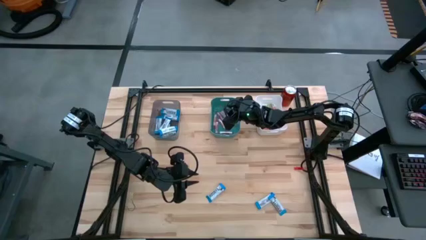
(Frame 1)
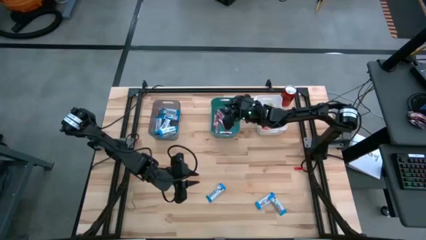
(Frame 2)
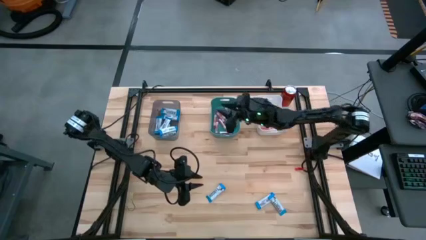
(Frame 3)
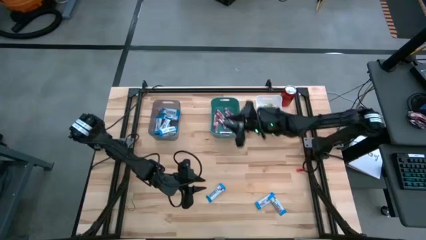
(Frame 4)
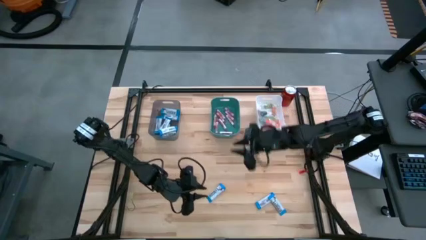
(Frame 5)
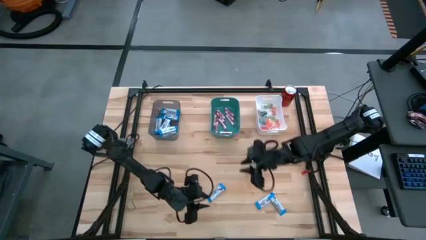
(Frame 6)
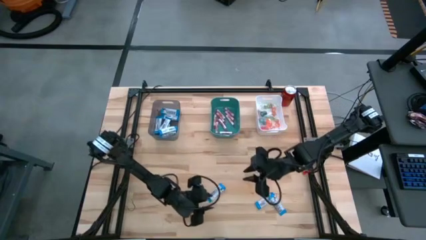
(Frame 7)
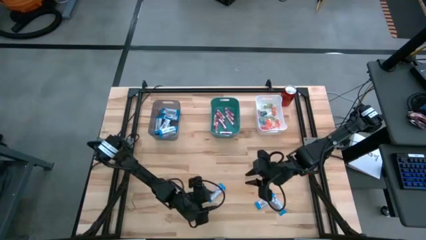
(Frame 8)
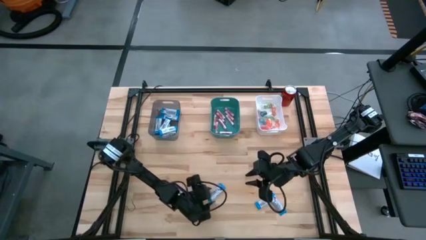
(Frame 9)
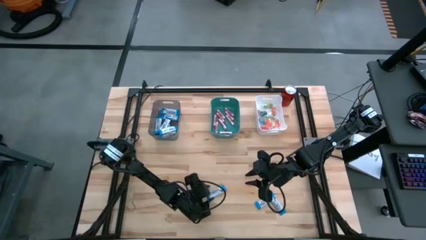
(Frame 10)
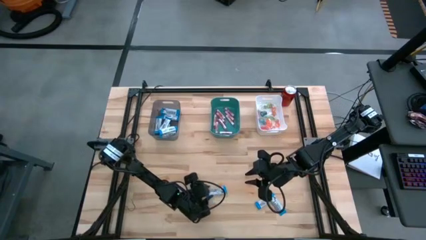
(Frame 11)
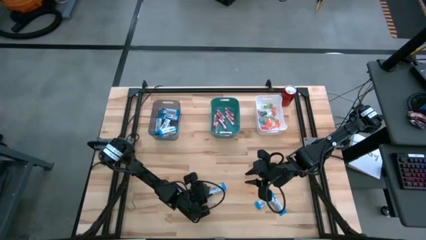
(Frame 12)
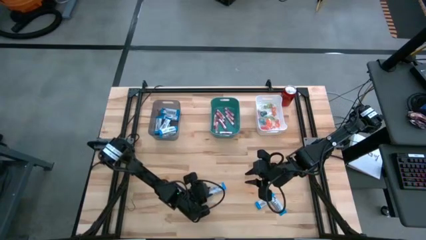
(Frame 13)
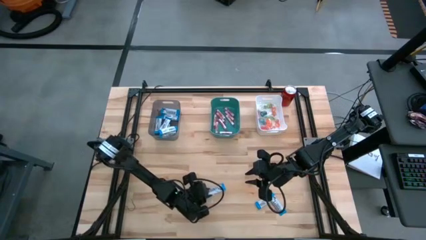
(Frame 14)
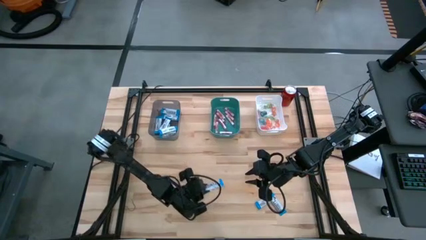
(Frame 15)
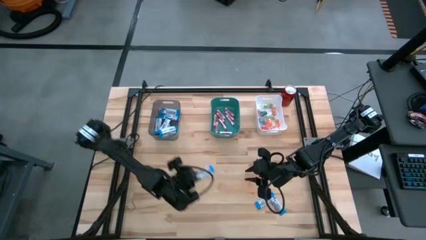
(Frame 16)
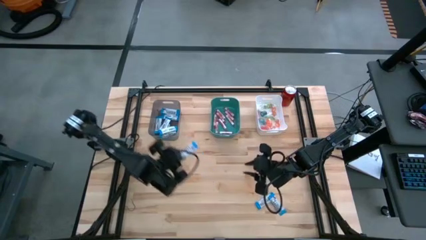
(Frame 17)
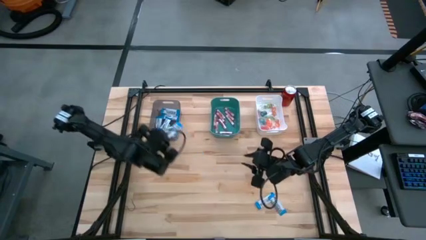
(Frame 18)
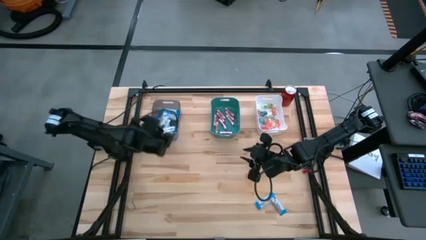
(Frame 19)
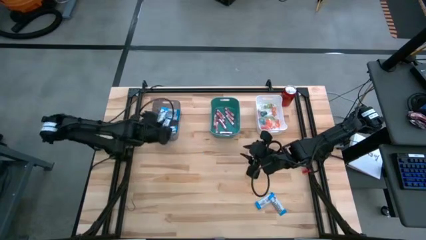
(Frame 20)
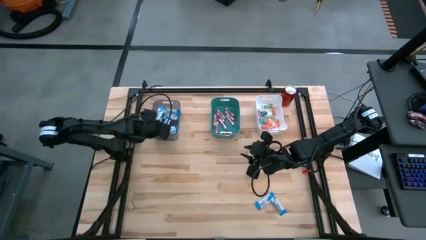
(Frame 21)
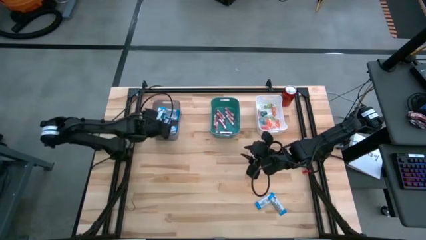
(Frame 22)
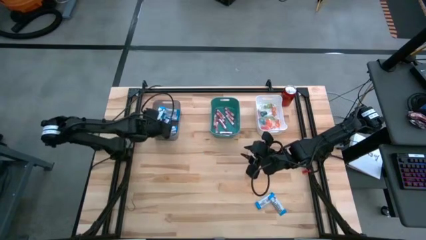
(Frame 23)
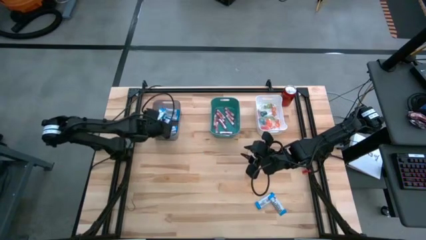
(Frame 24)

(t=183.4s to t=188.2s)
Task: Sort candy
Put the white chocolate into the black bin

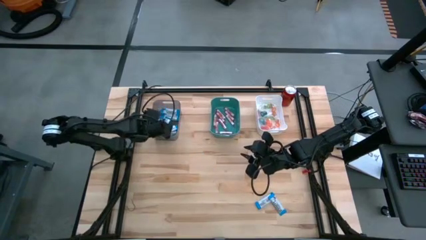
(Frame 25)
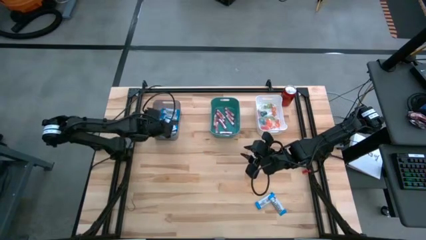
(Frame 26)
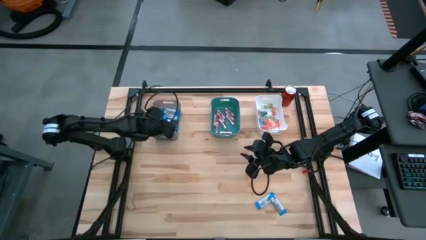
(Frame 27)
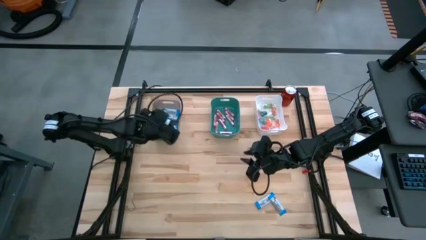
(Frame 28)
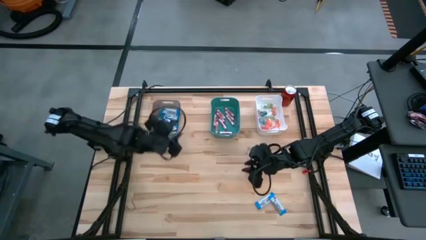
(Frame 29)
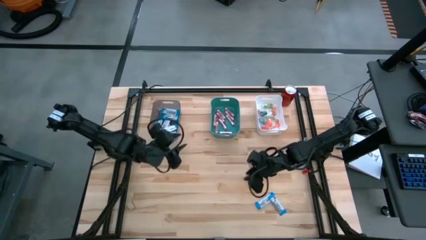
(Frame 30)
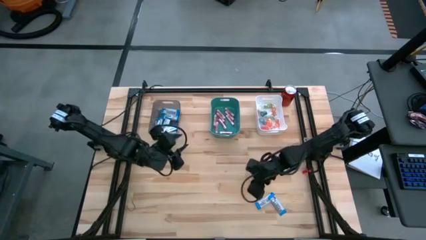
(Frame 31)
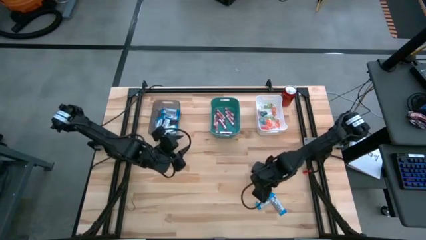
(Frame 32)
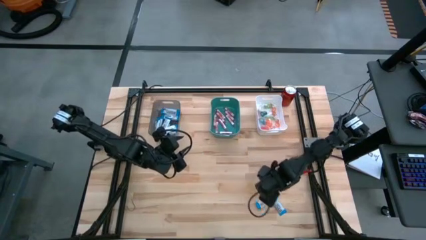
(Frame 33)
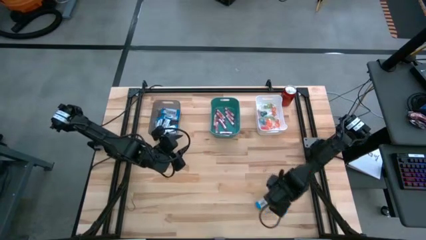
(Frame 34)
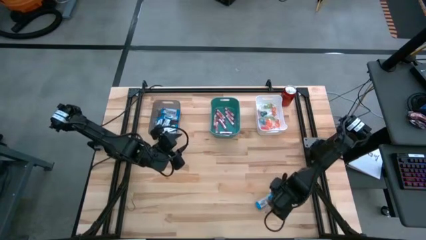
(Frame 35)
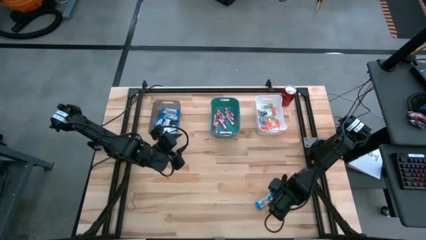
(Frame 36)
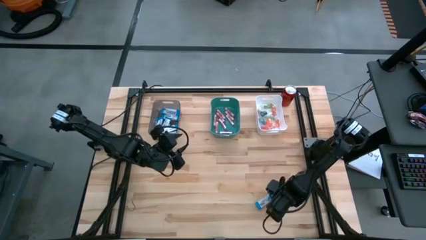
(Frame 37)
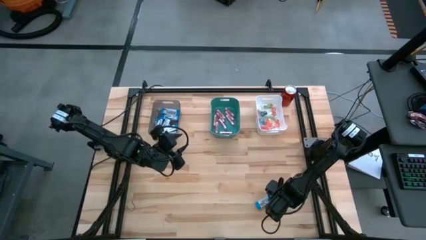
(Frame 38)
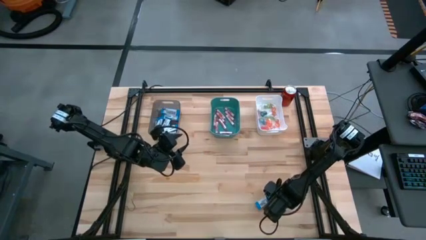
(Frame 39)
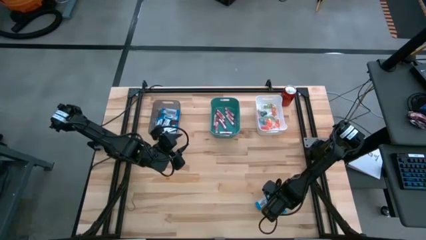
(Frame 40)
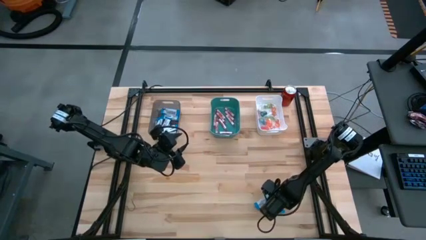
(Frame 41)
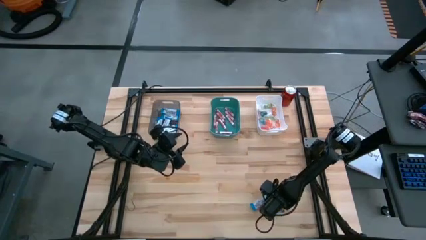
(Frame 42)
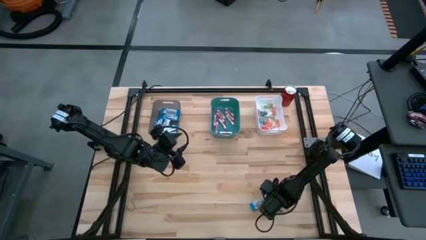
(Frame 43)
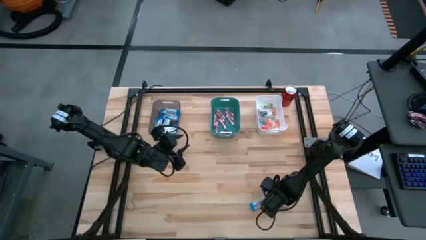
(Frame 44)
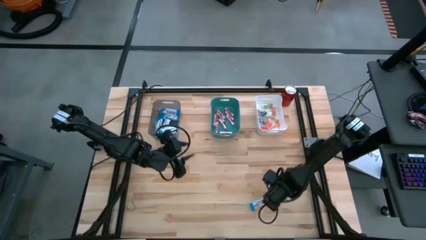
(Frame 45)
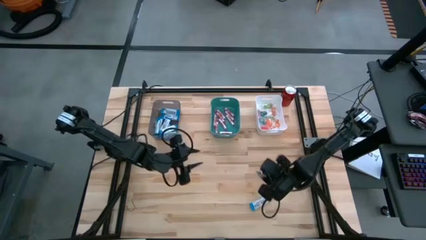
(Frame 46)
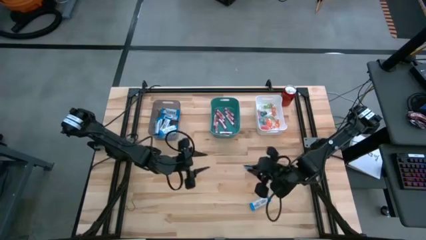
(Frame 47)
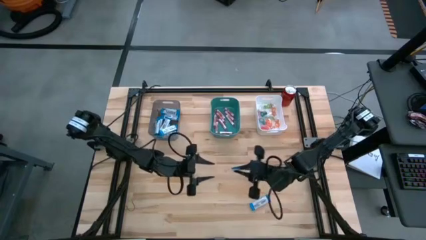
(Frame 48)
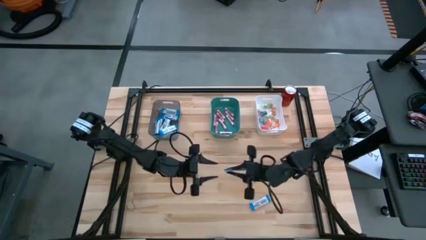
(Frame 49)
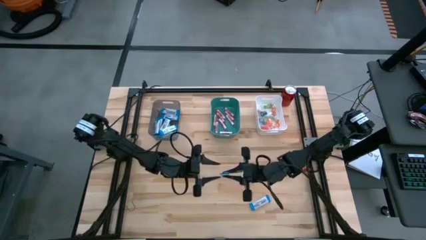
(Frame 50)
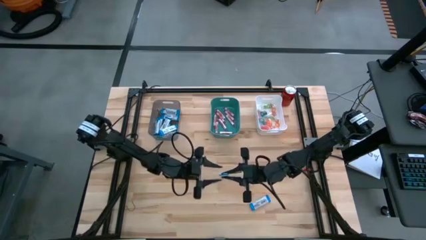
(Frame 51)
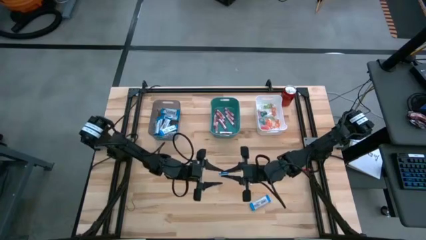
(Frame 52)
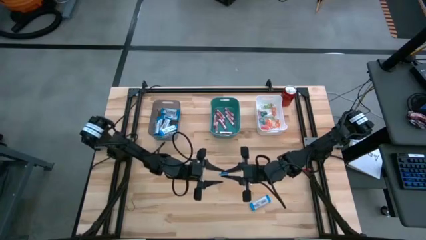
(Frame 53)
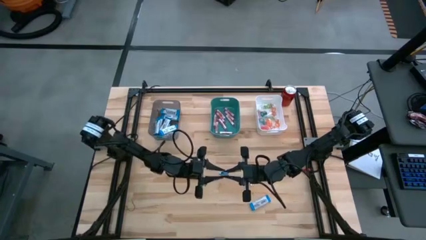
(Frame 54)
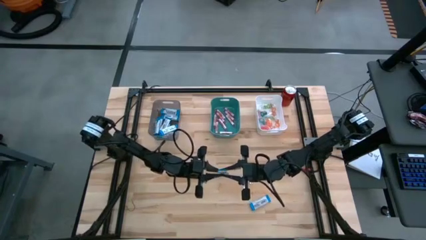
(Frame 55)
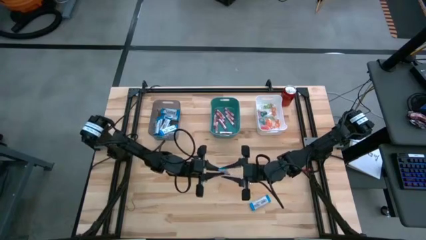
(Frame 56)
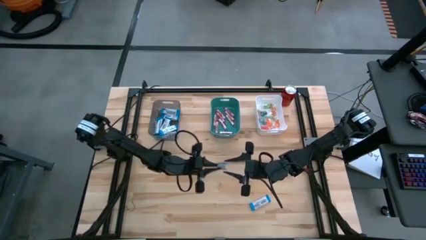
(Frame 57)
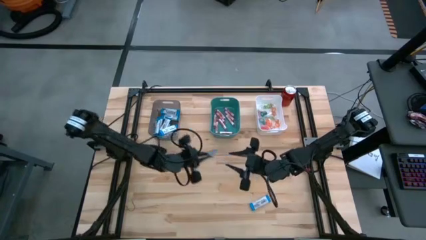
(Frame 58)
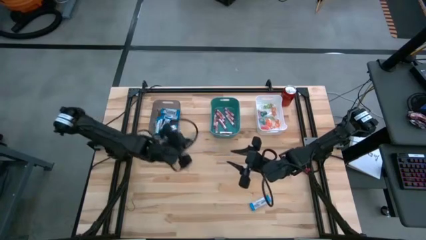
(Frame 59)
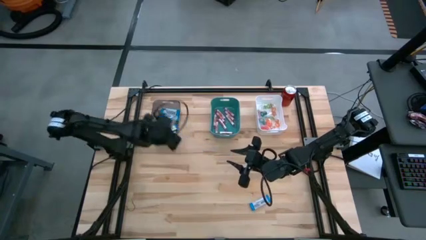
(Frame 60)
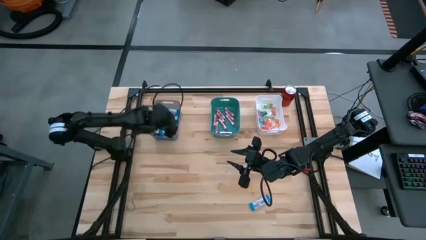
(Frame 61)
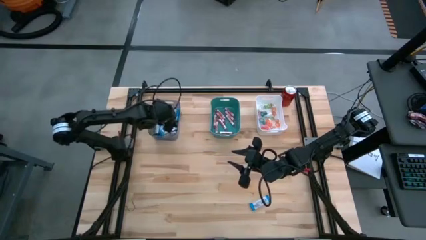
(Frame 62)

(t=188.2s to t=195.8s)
Put the white chocolate into the black bin

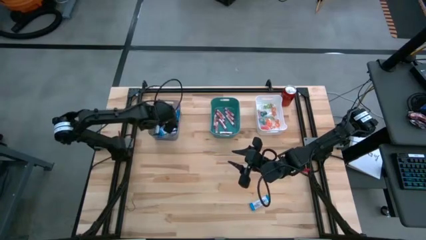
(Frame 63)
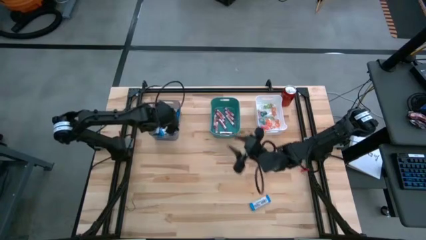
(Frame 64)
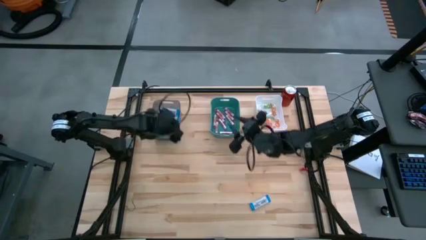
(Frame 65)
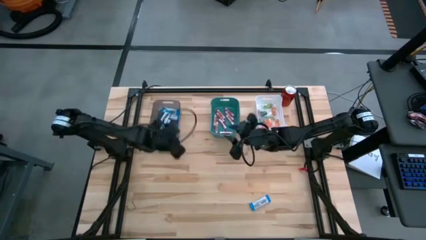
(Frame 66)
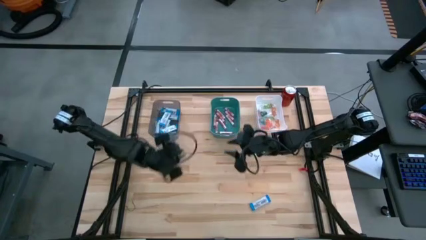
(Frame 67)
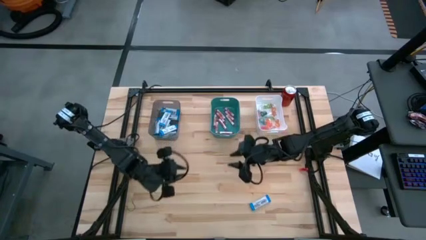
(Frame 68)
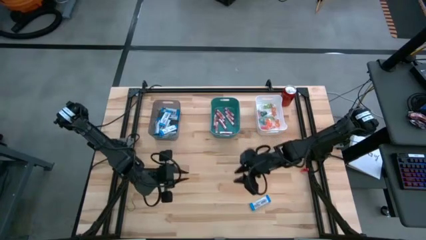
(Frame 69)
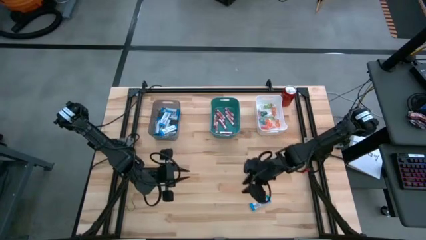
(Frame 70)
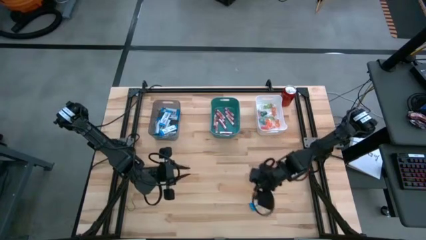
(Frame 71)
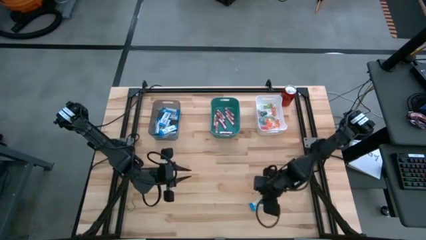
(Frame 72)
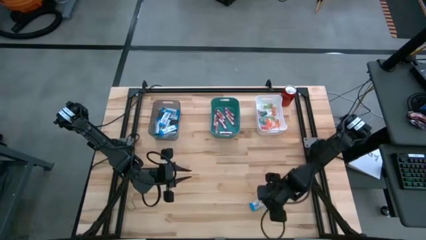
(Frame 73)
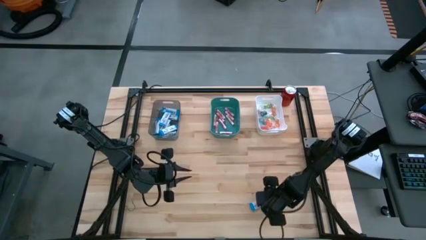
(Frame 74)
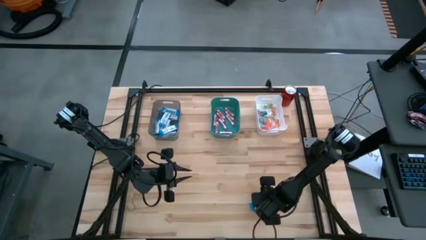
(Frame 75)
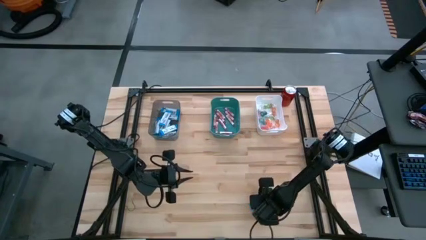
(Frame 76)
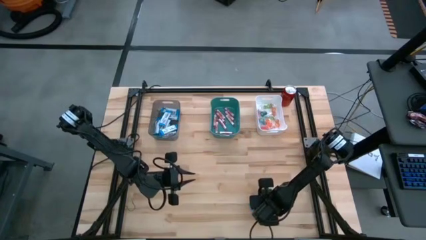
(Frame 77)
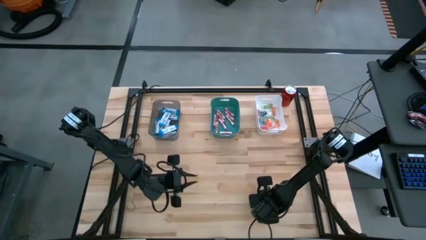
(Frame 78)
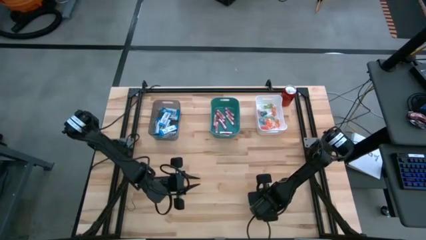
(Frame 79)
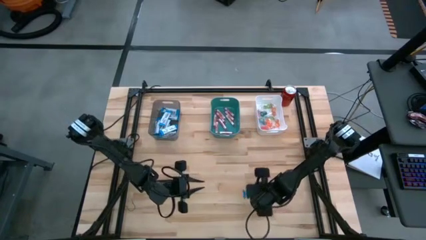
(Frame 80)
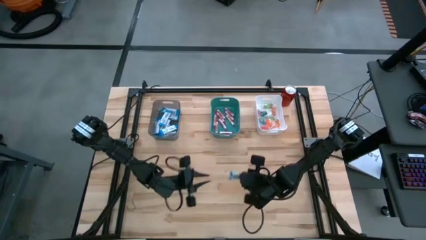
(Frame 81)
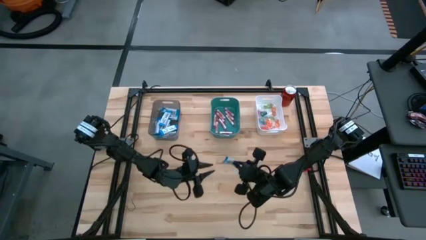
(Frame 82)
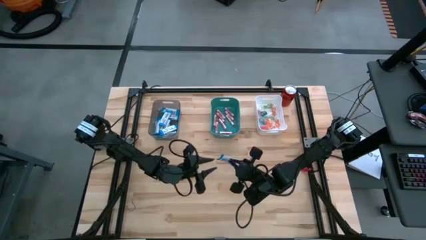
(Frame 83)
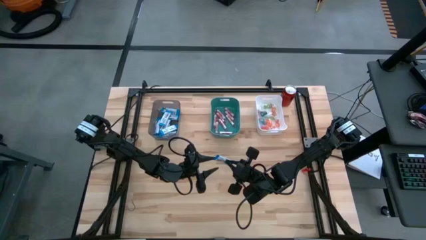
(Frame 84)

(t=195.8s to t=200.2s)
Put the white chocolate into the black bin
